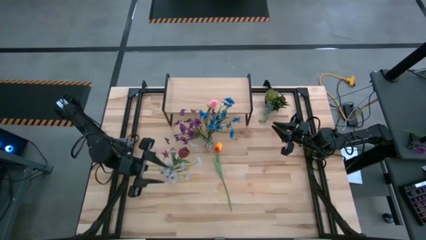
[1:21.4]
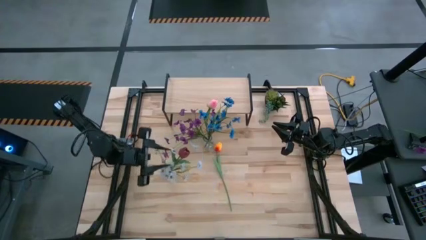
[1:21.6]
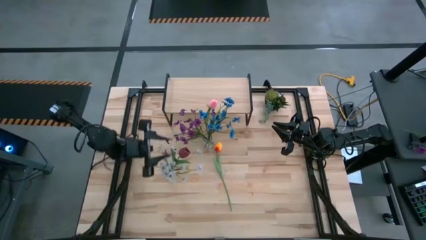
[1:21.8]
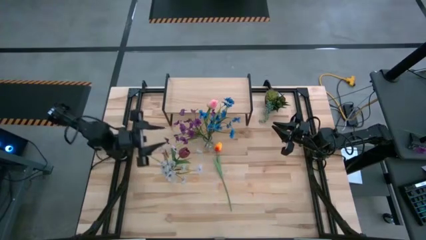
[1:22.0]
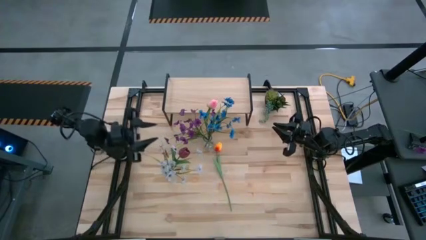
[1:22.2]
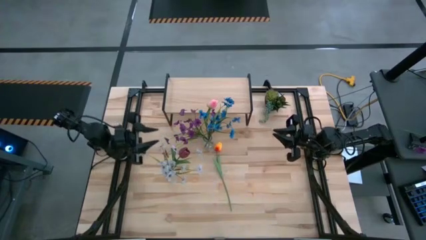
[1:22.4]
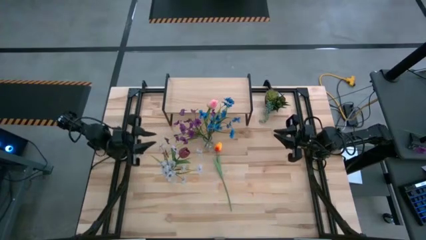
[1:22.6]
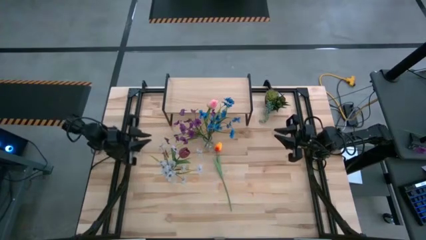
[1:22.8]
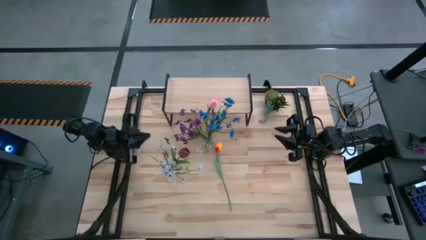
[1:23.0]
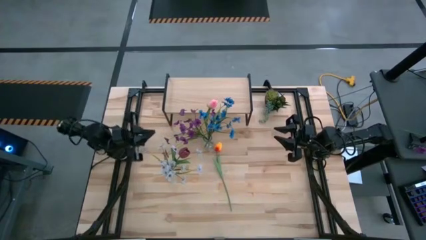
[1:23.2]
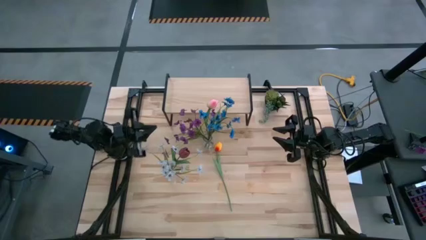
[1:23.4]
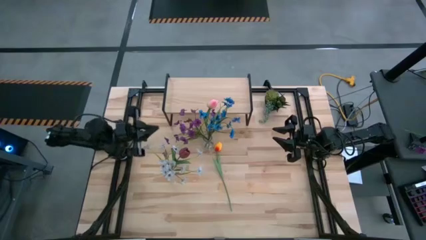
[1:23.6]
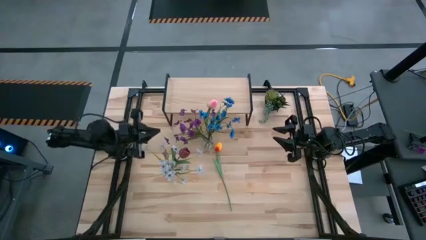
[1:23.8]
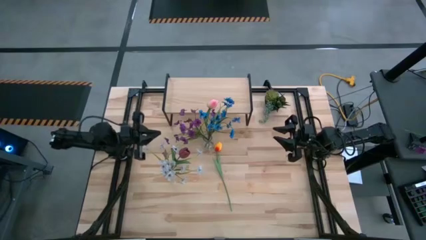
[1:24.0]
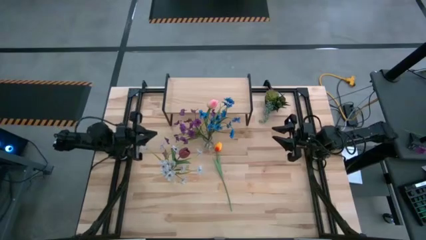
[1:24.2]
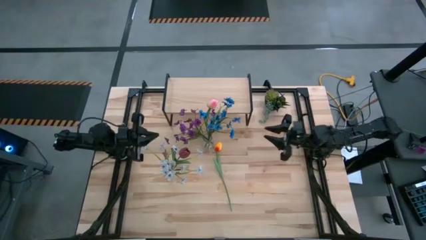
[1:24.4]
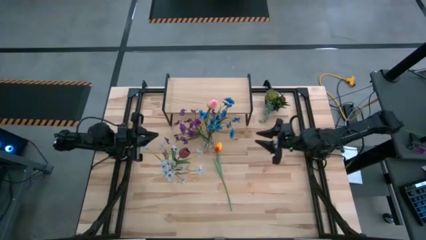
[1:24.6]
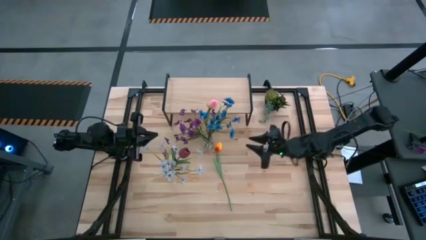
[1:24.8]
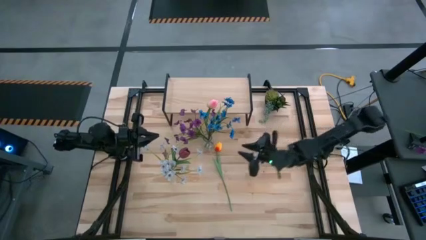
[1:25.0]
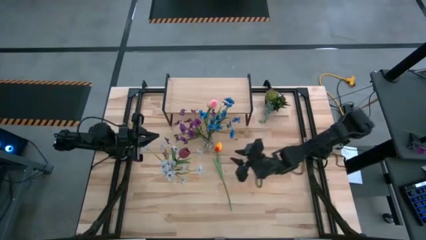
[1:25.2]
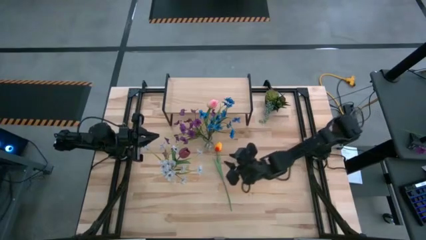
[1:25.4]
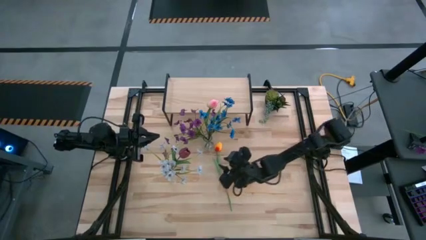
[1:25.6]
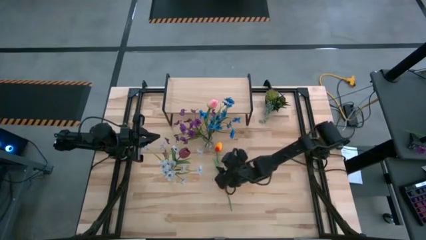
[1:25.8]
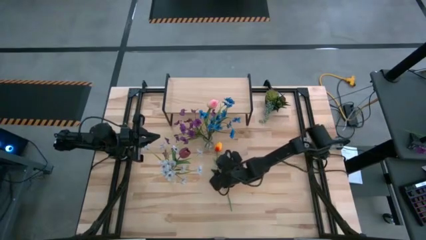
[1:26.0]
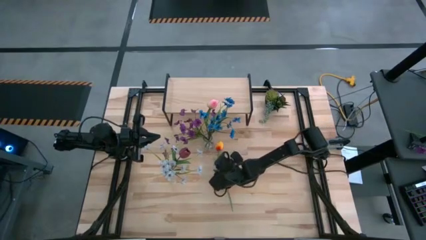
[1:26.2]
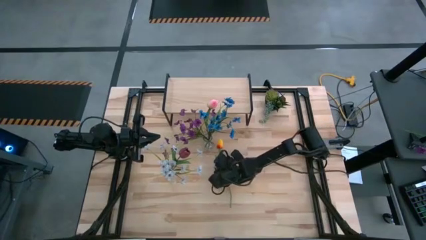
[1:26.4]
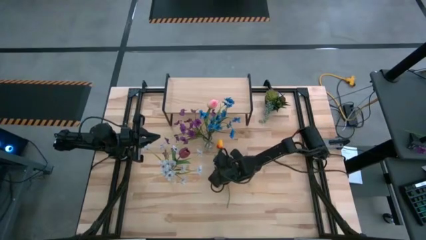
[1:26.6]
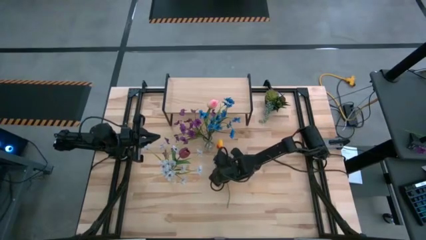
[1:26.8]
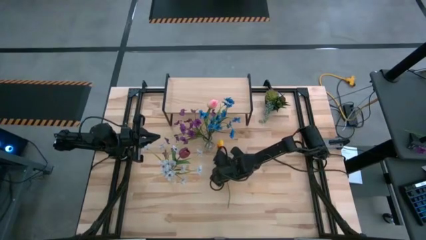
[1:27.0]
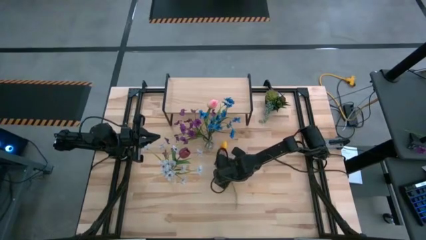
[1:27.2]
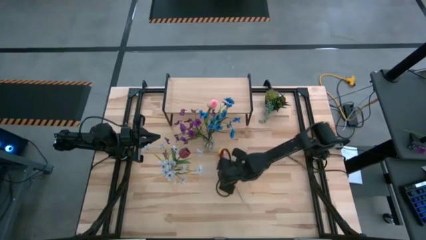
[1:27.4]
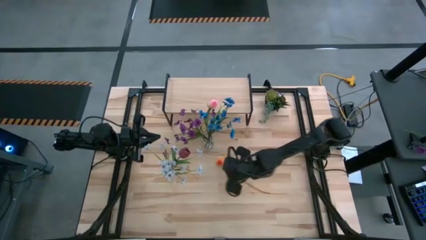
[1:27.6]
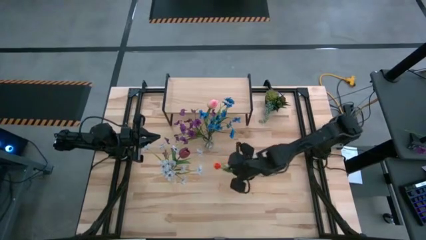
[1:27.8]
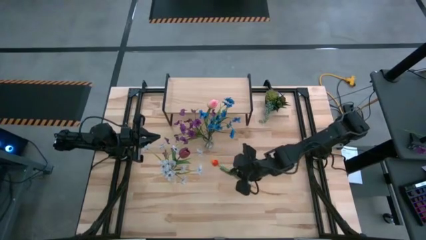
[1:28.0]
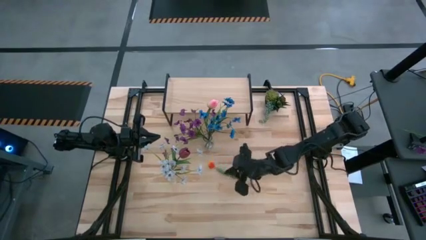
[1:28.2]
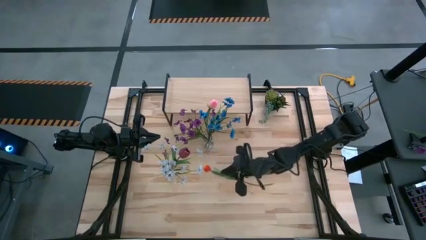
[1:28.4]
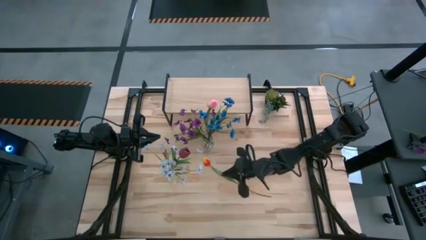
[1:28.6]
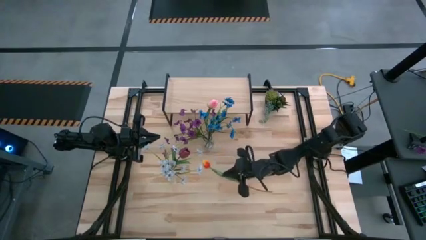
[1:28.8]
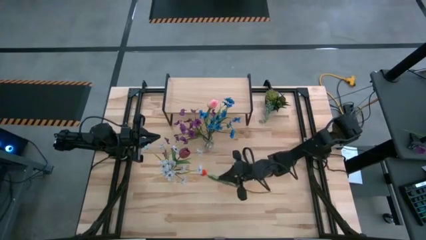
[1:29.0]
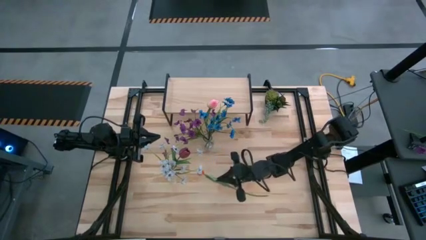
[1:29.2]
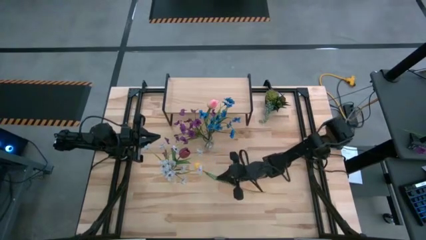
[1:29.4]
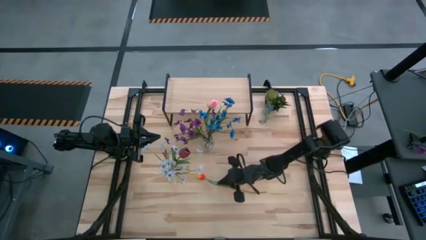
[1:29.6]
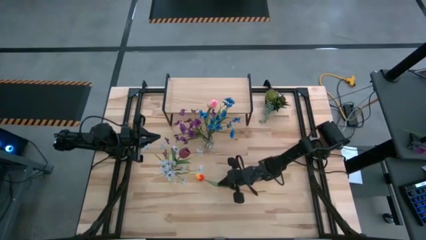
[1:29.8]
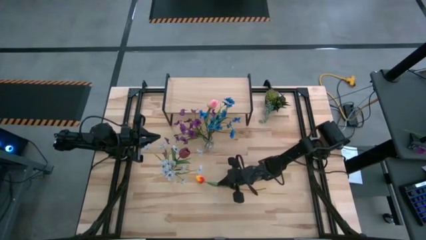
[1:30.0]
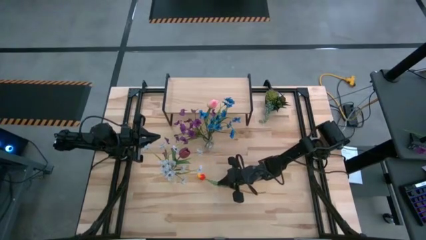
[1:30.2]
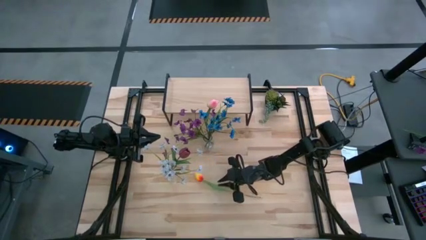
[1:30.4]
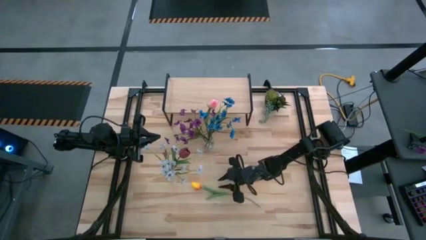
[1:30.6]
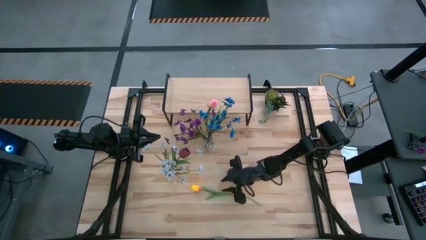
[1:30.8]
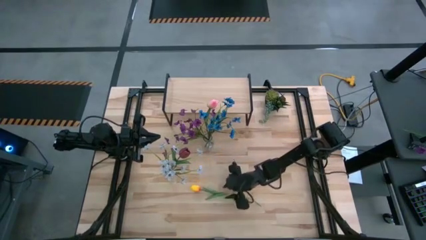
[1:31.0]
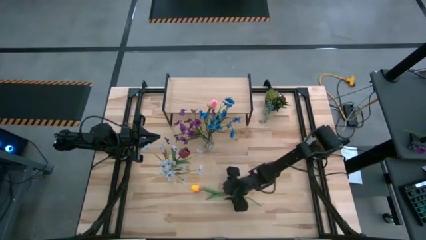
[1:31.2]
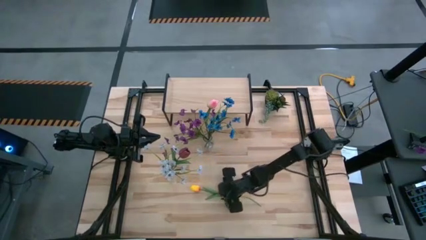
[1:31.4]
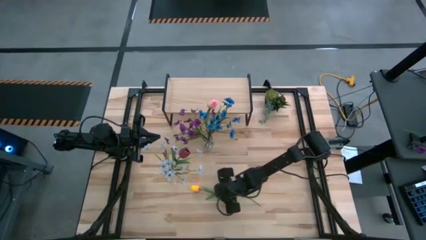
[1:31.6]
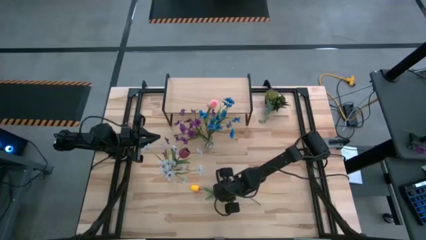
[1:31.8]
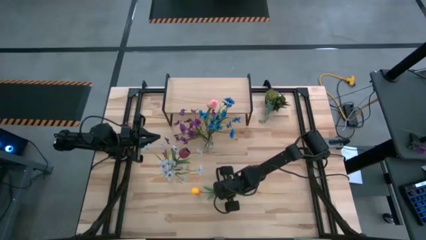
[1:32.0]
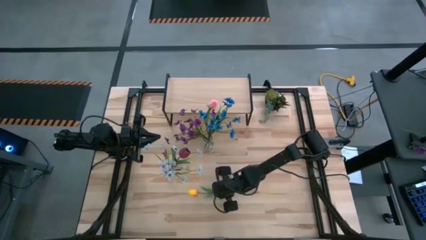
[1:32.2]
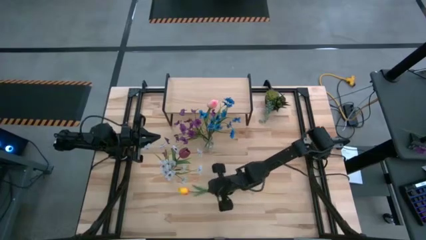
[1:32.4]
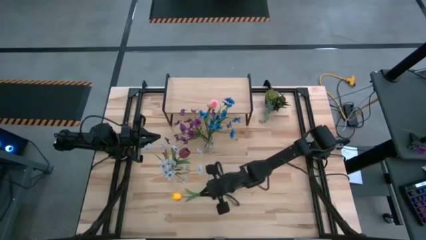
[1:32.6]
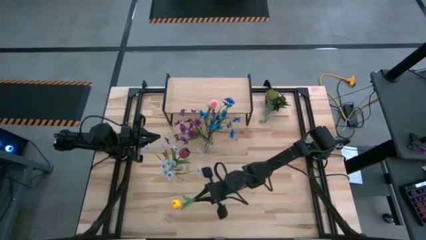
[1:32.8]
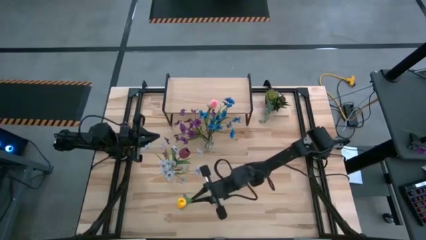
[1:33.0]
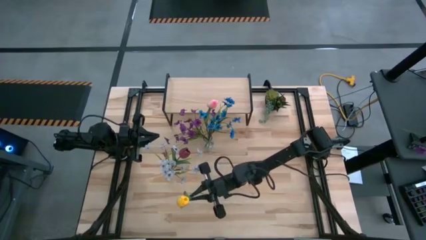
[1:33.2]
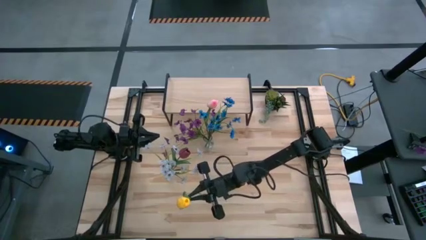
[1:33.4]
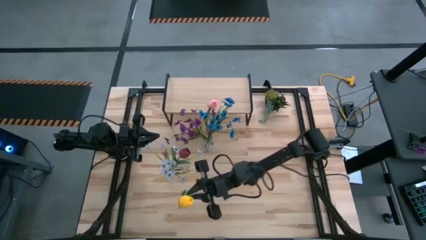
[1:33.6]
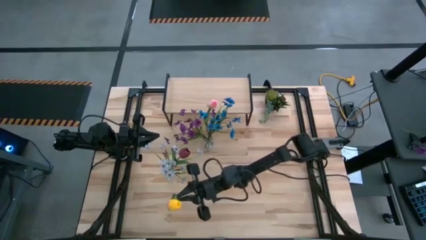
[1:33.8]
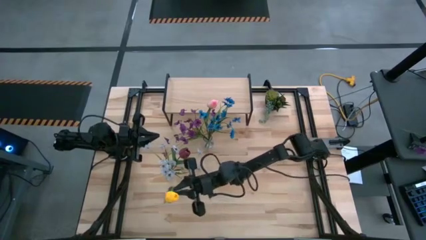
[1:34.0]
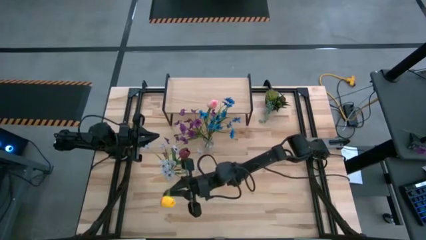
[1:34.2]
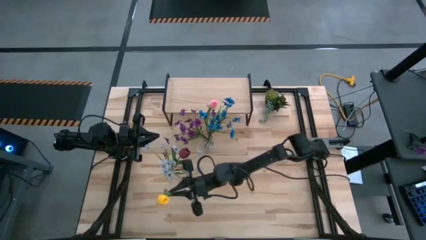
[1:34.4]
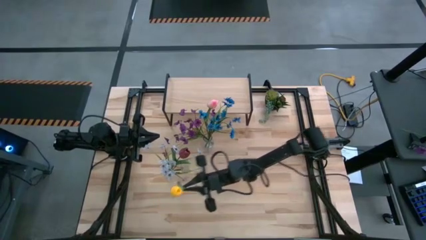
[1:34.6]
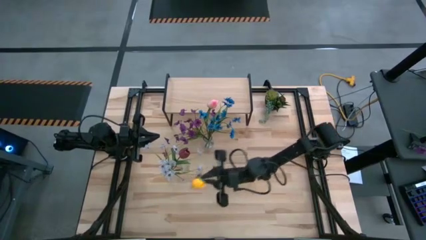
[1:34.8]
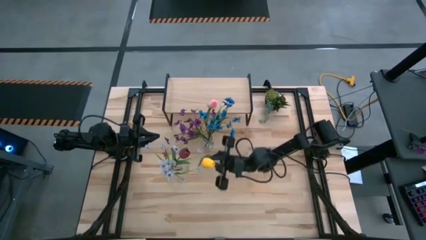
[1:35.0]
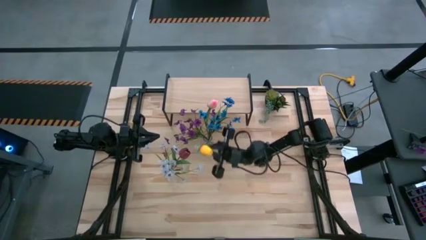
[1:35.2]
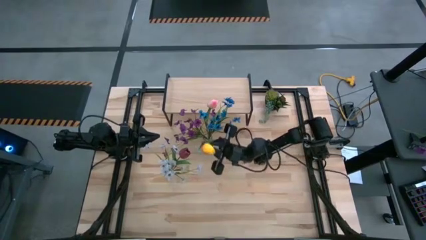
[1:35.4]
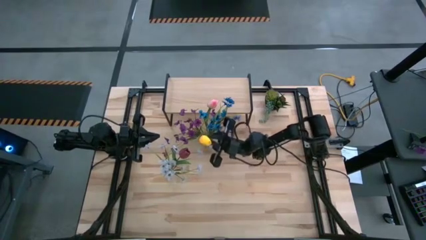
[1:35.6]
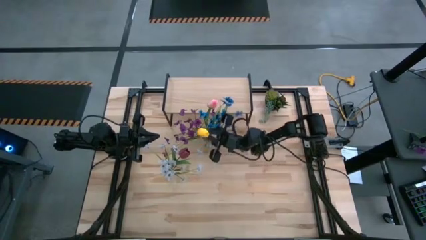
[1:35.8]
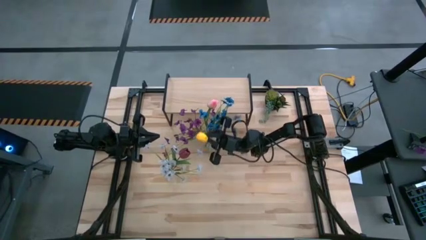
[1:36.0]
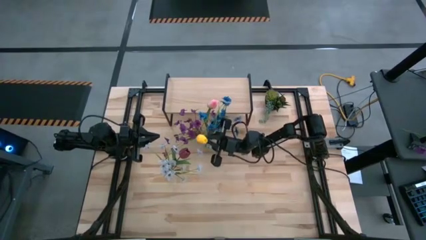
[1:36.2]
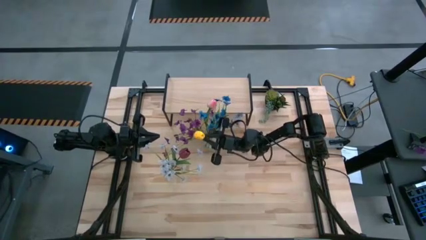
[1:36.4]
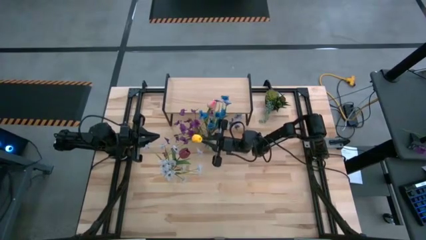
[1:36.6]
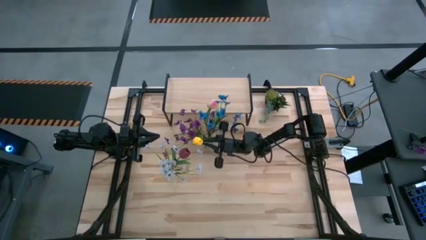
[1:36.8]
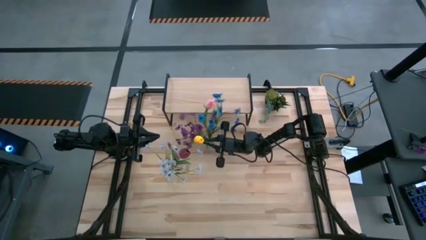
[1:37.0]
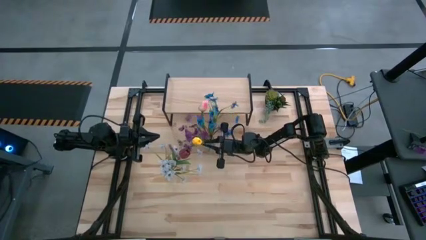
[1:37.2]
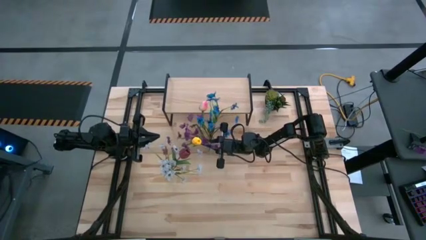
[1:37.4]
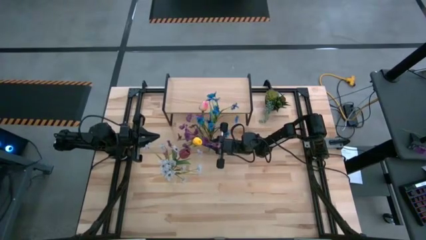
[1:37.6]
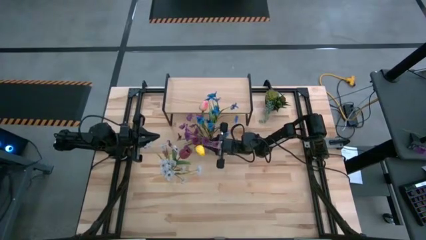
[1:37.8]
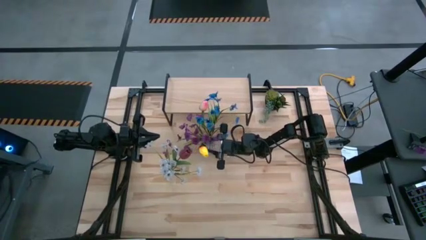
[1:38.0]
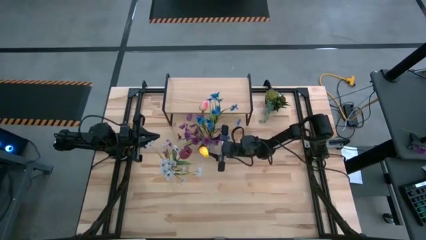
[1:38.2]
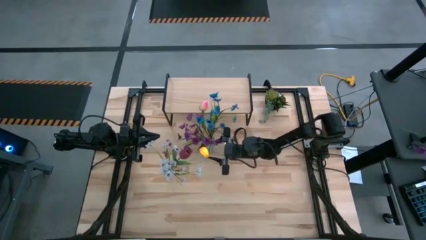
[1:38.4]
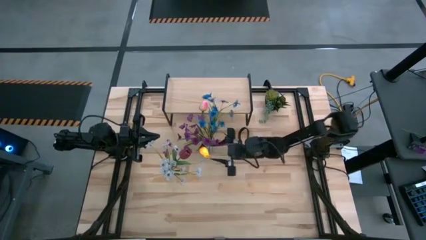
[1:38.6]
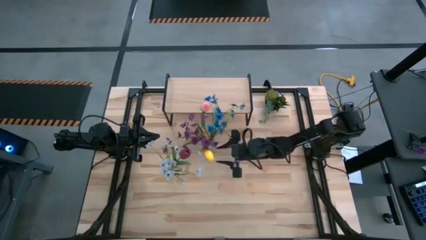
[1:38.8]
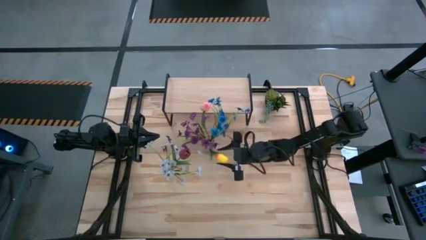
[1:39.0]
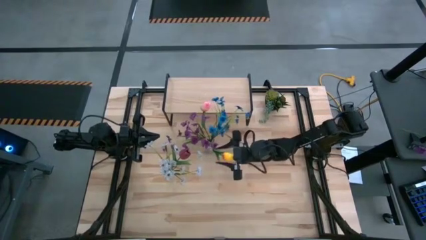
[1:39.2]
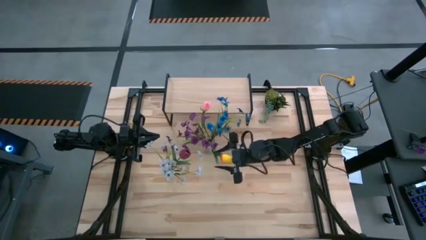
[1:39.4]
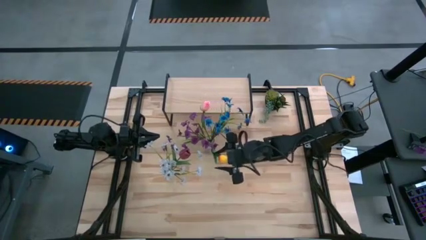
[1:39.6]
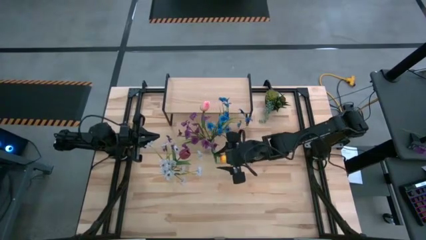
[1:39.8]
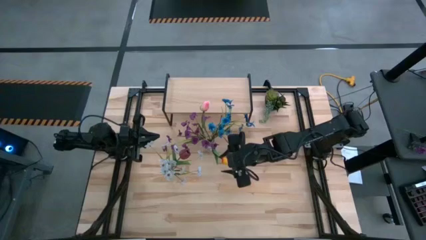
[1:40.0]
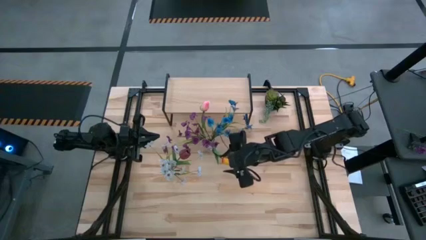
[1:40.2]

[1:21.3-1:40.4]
Task: Pick and place flowers into a vace then onto a shelf
Put the yellow flower into the right transparent vase
